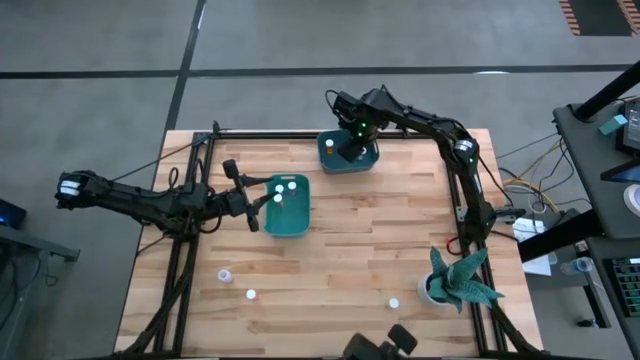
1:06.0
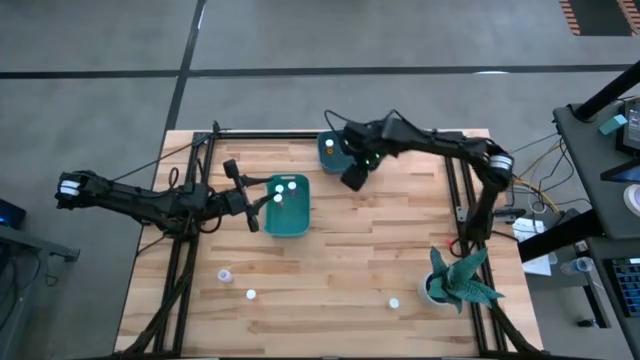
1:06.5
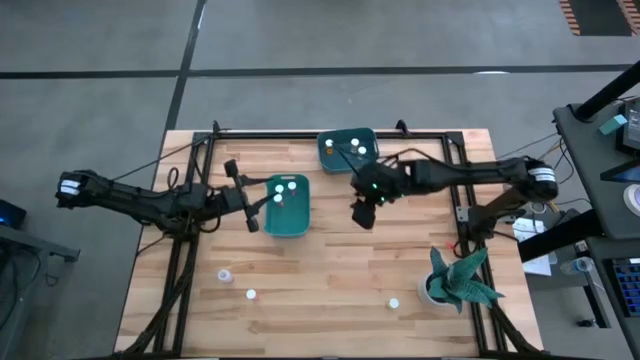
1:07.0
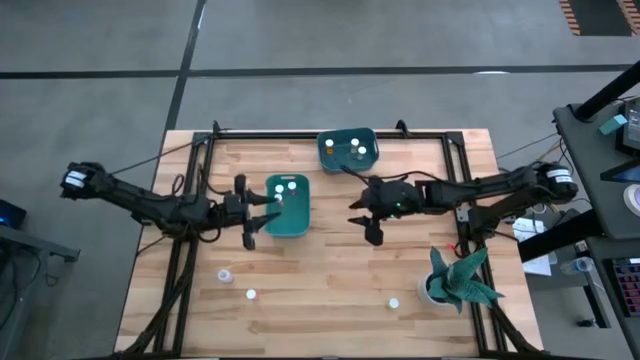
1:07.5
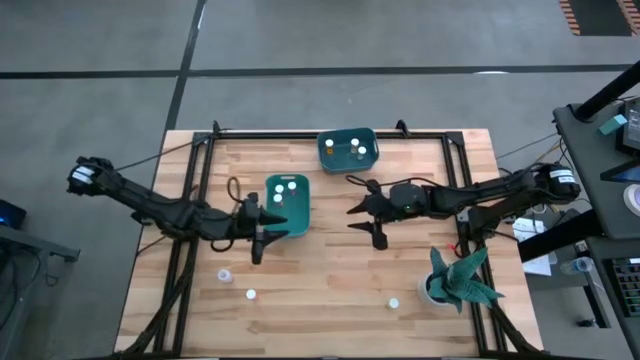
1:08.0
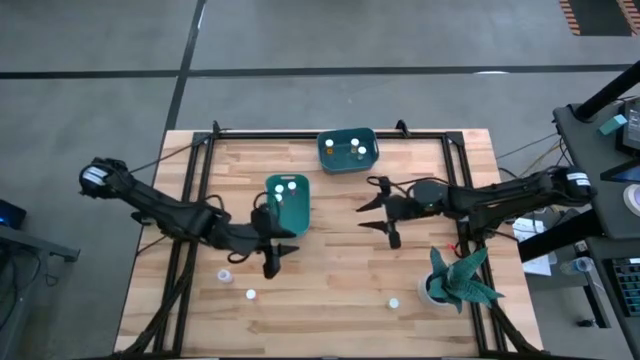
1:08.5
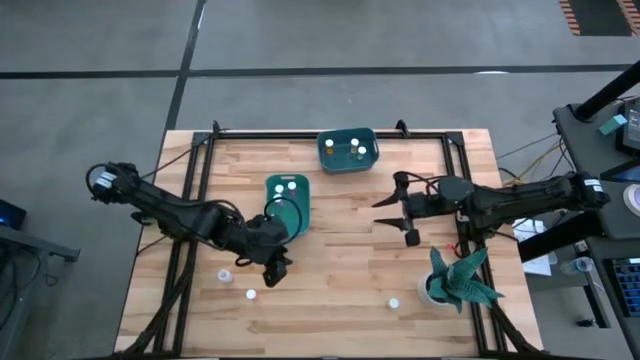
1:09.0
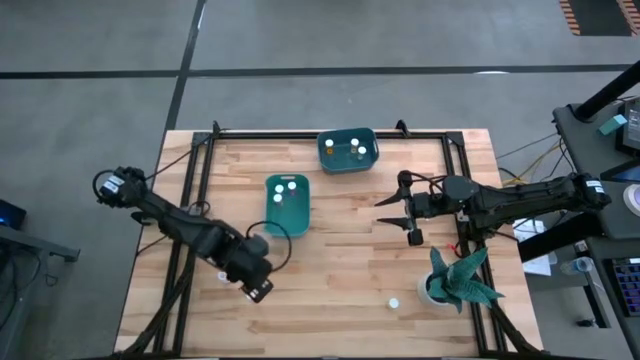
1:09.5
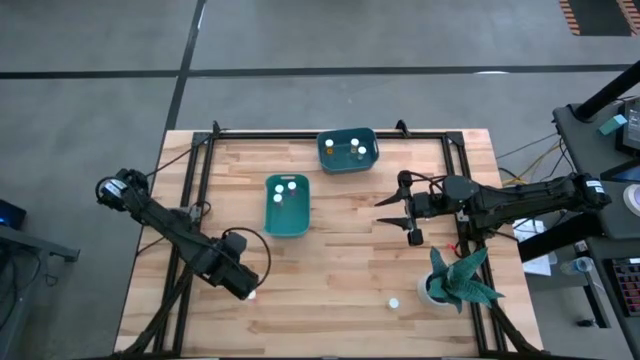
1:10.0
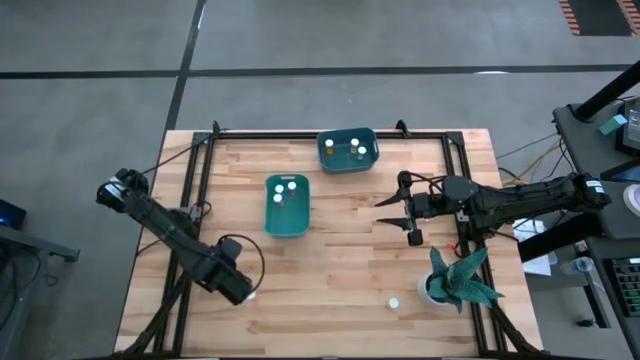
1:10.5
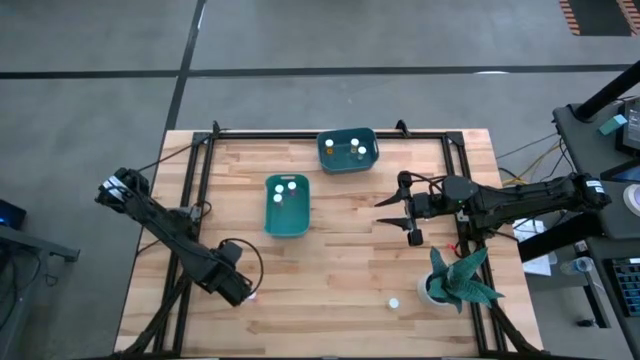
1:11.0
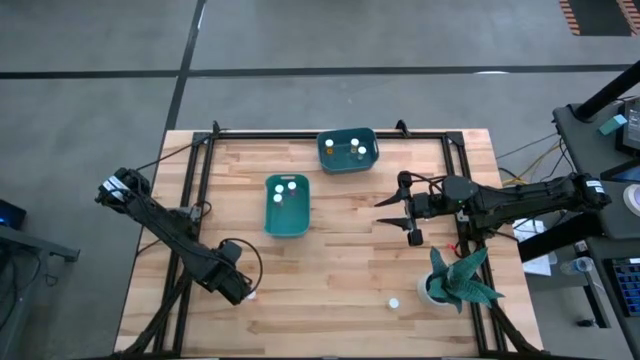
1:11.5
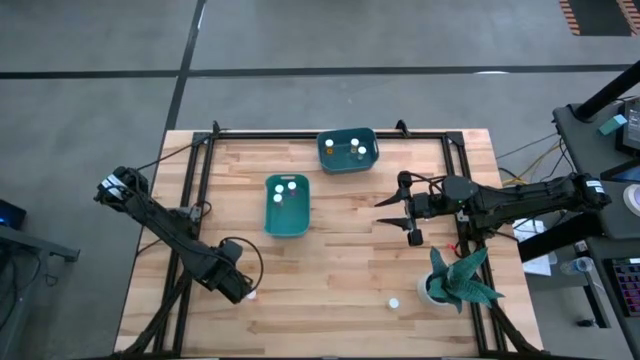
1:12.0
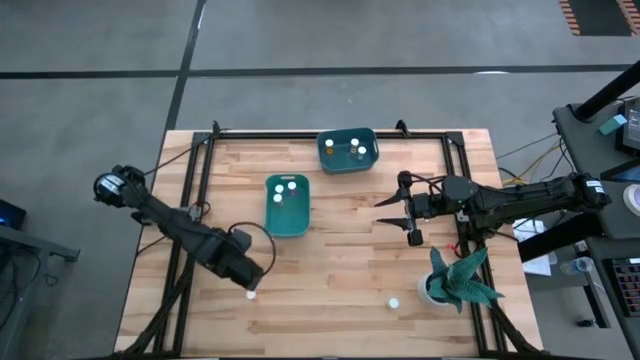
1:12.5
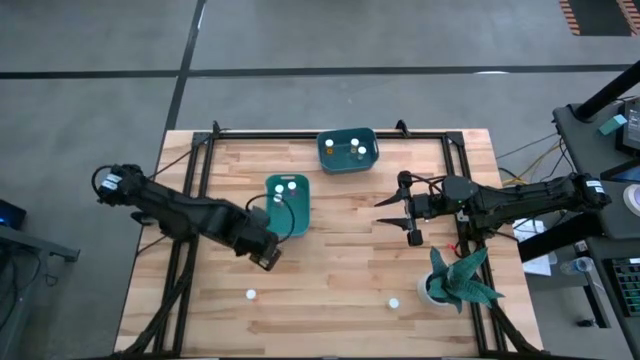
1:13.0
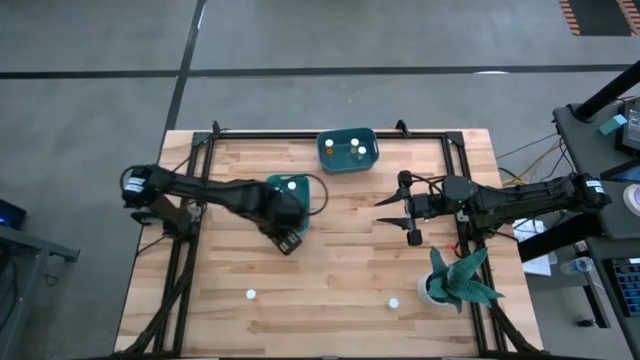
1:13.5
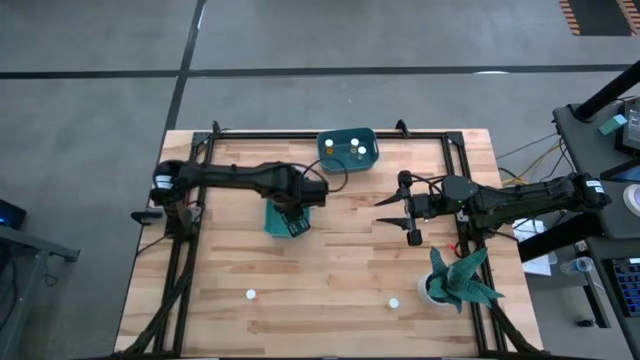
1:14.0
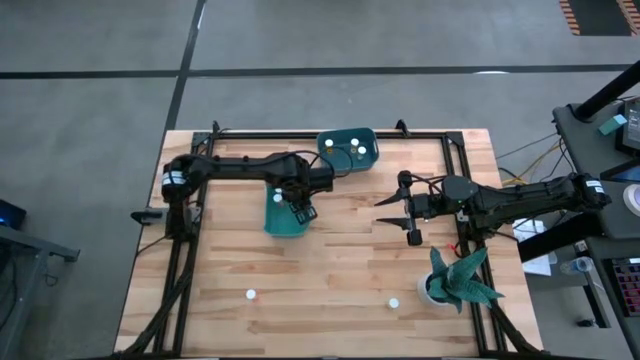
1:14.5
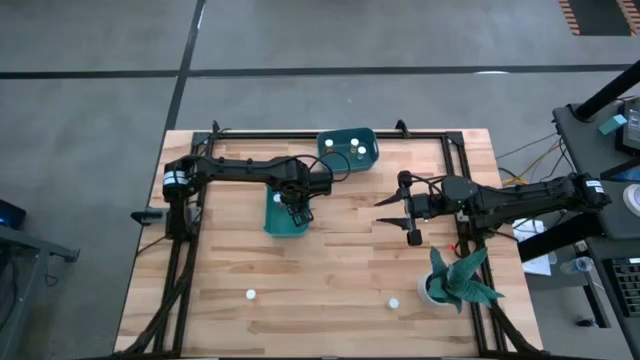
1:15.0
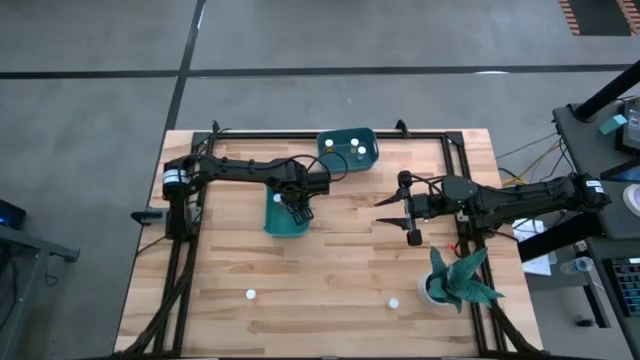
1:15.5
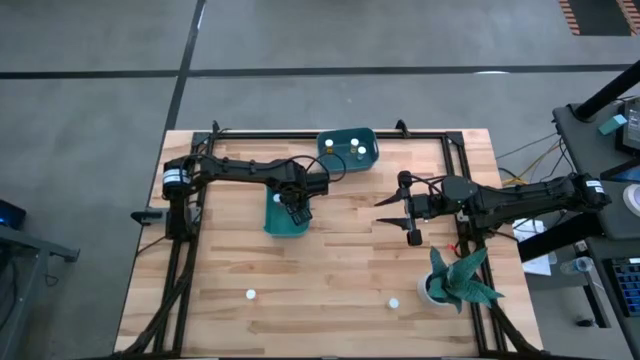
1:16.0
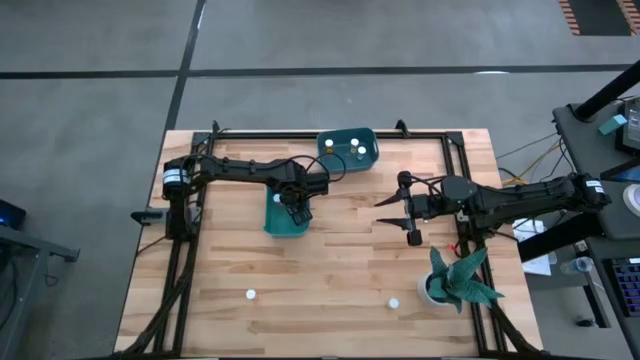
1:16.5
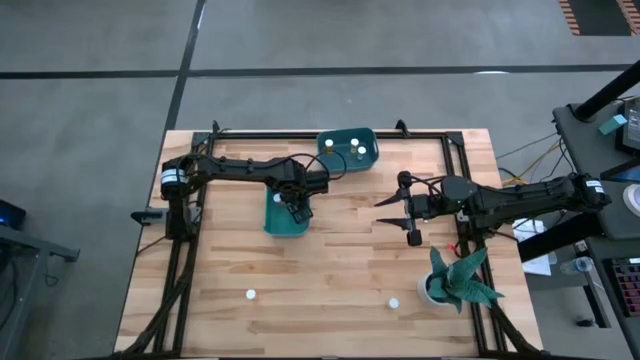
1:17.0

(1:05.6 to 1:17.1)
Task: Pick and place medicine bottles into bin by pill shape (circle, oval)
Put the white capsule pill bottle into the green bin

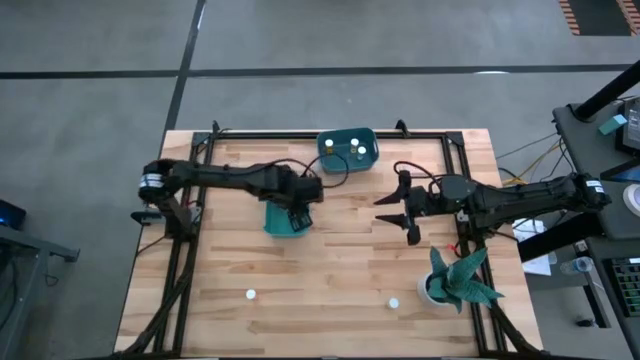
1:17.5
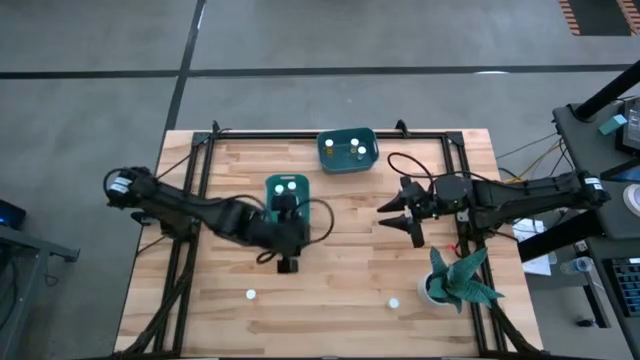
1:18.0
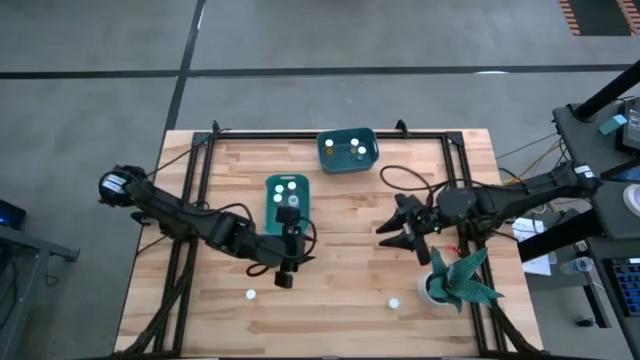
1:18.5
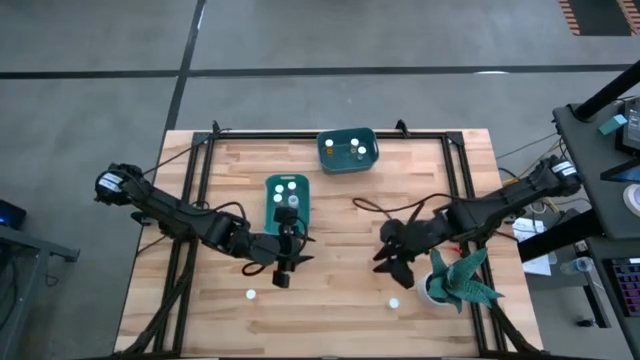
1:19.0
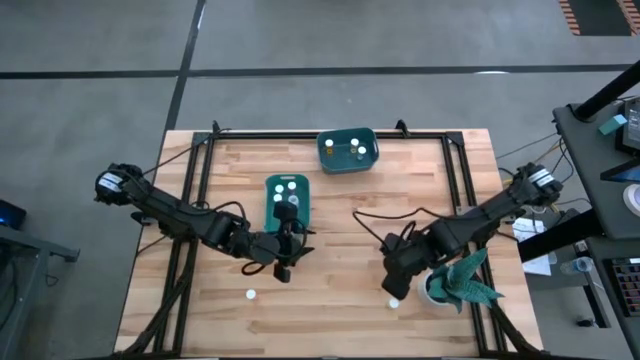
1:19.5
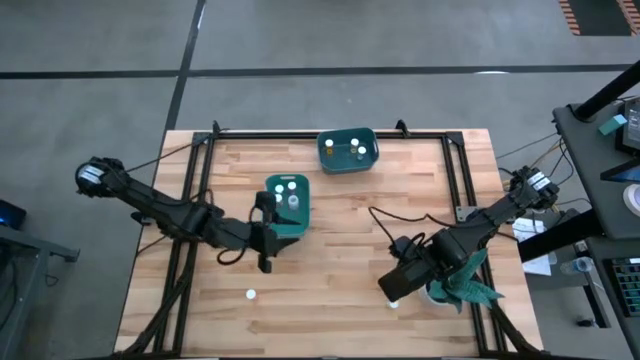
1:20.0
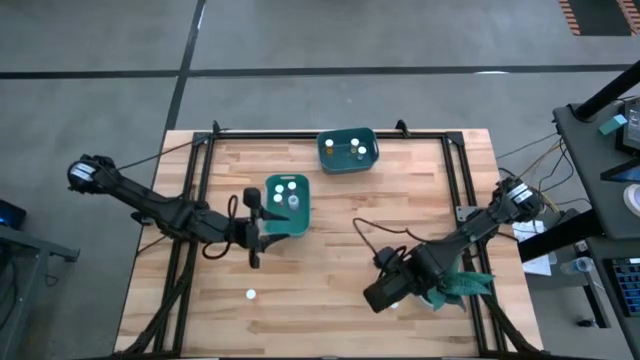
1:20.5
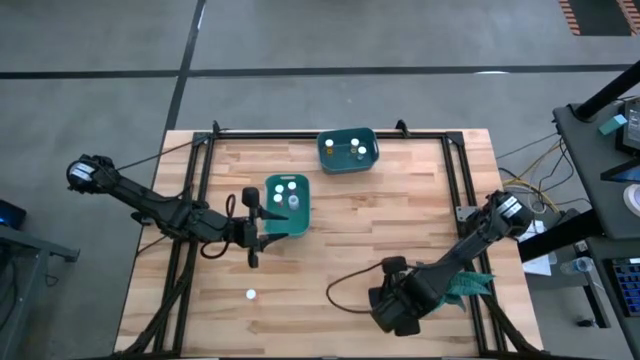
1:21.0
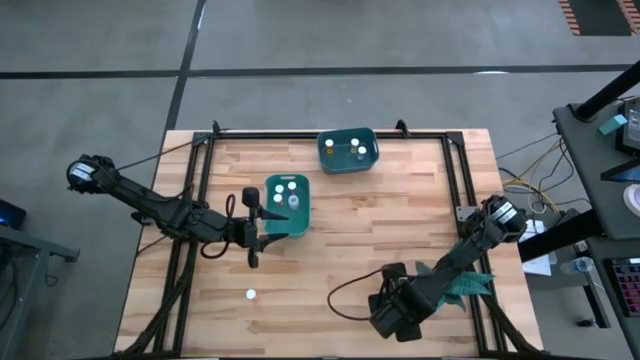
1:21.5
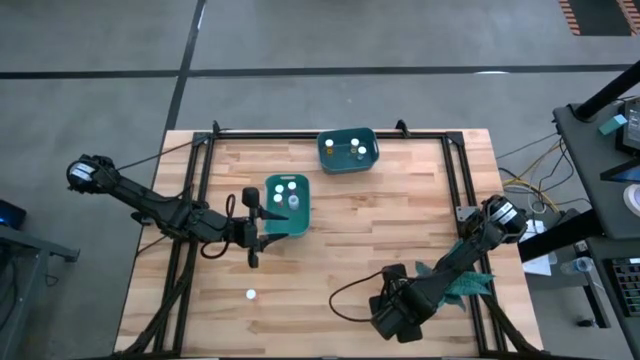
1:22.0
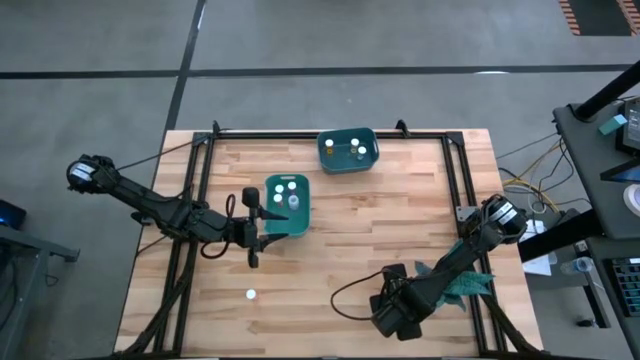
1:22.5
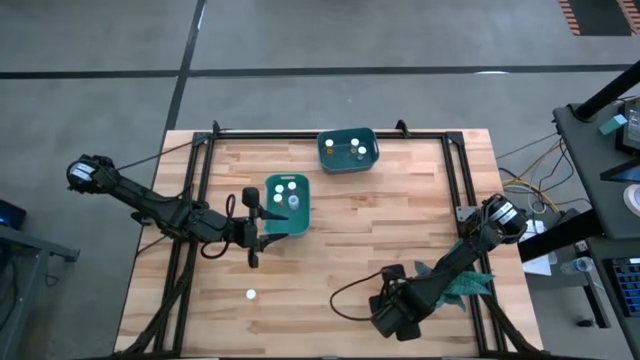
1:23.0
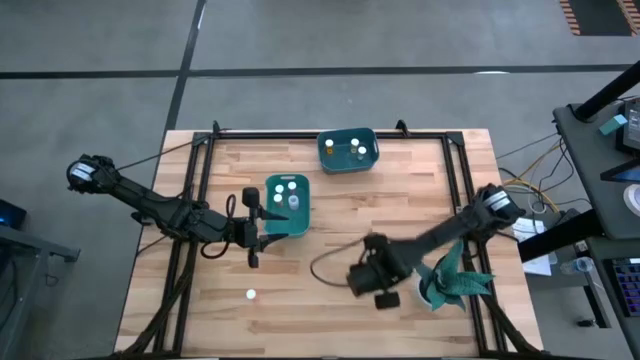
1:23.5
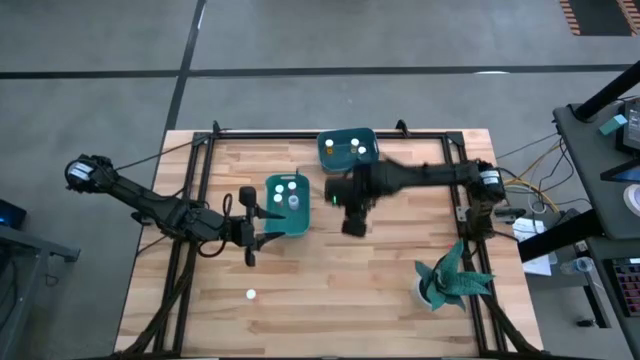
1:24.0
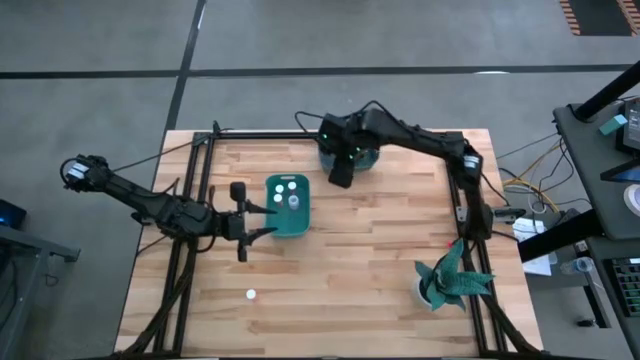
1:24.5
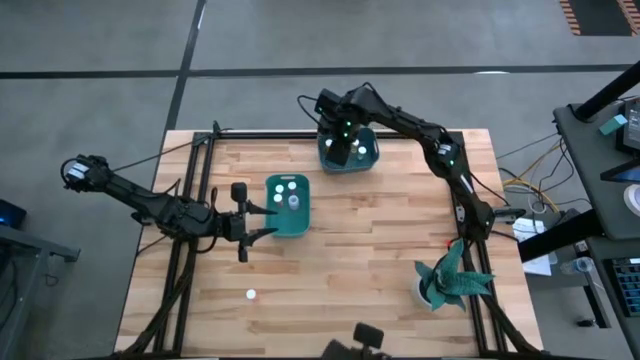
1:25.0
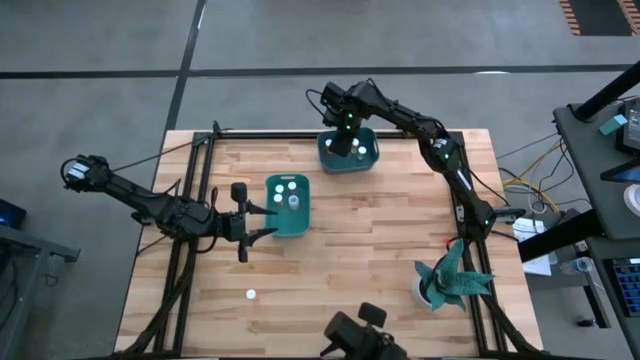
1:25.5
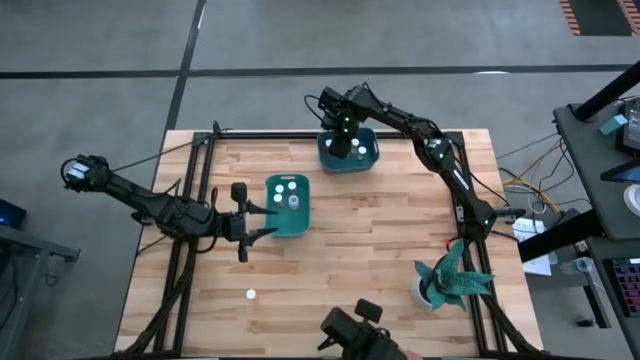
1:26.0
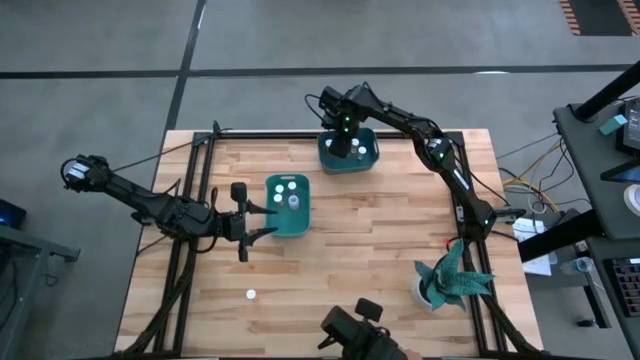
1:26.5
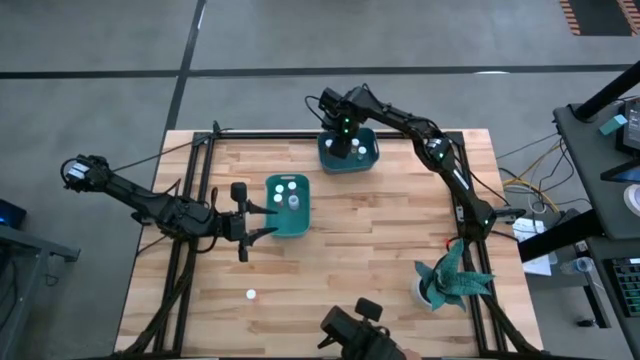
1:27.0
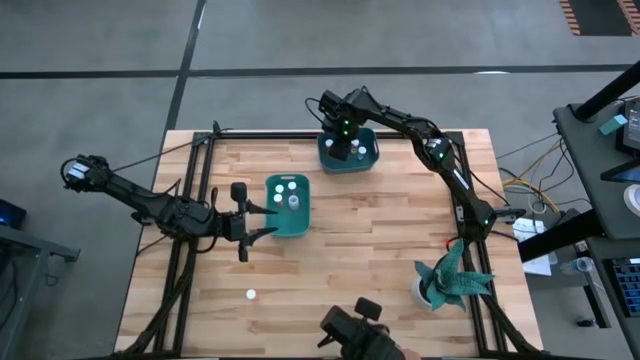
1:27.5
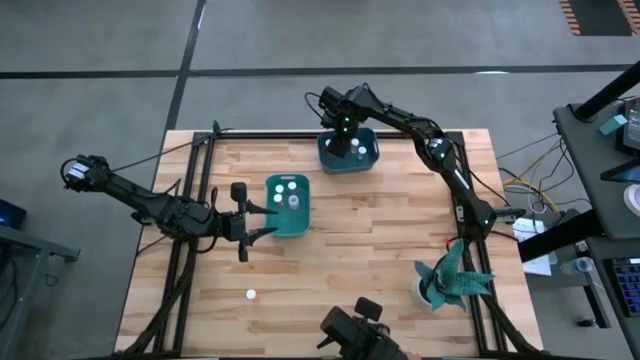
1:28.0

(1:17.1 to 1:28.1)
Put the yellow tablet pill bottle into the blue bin
